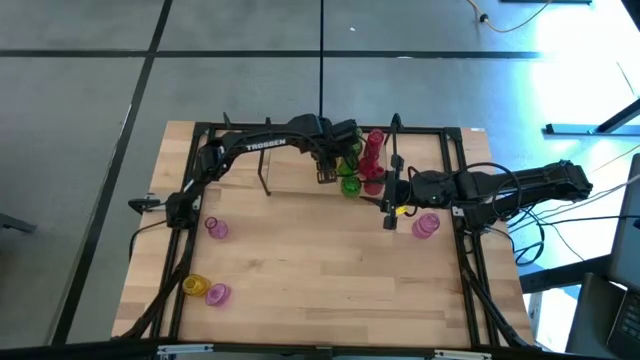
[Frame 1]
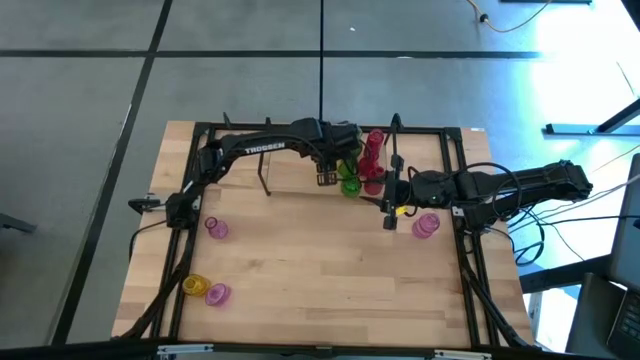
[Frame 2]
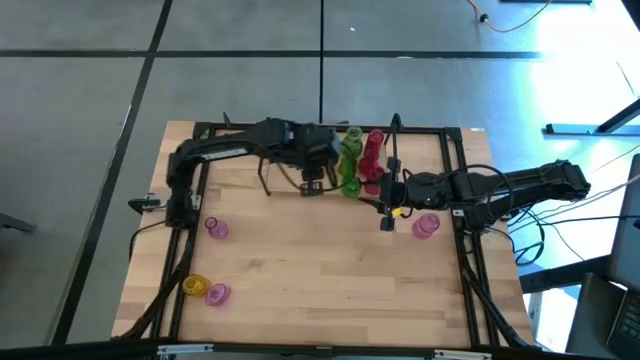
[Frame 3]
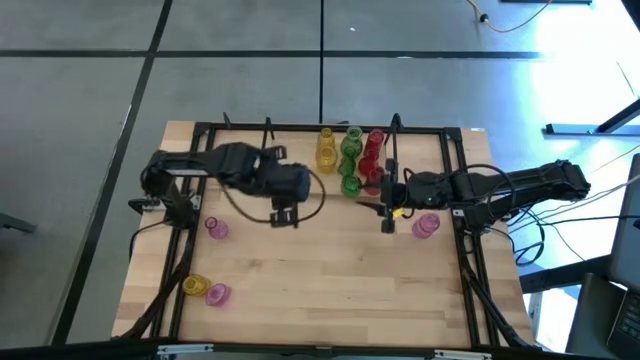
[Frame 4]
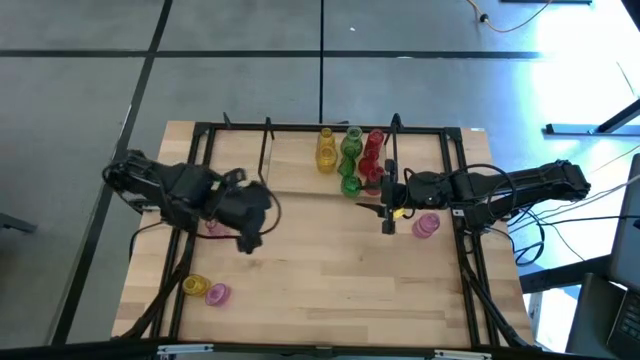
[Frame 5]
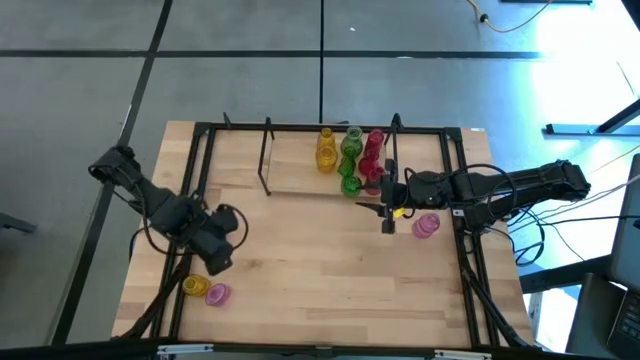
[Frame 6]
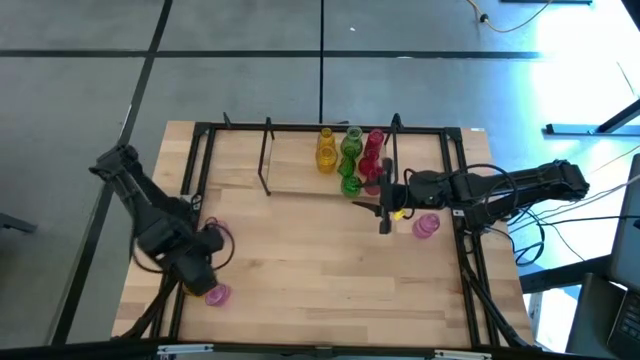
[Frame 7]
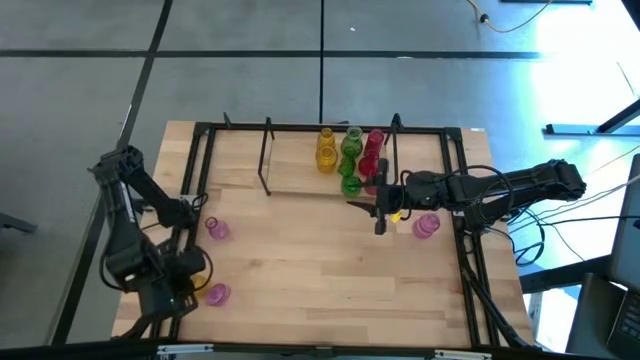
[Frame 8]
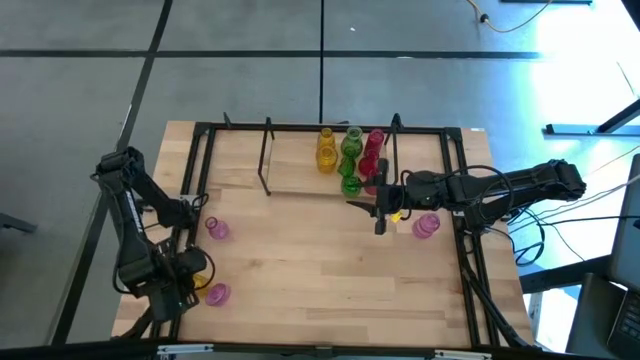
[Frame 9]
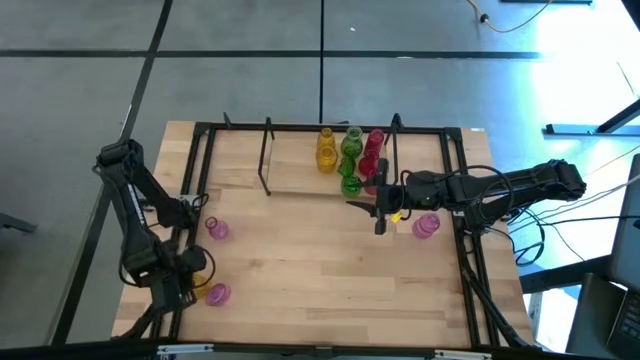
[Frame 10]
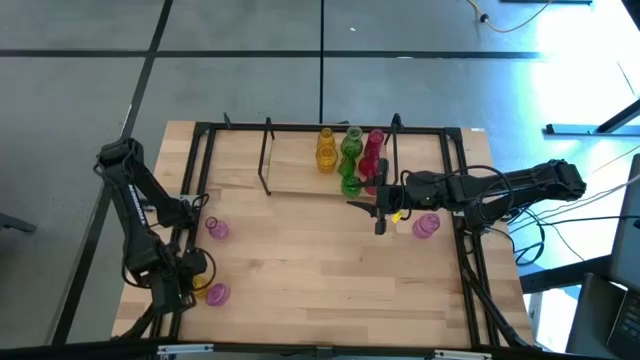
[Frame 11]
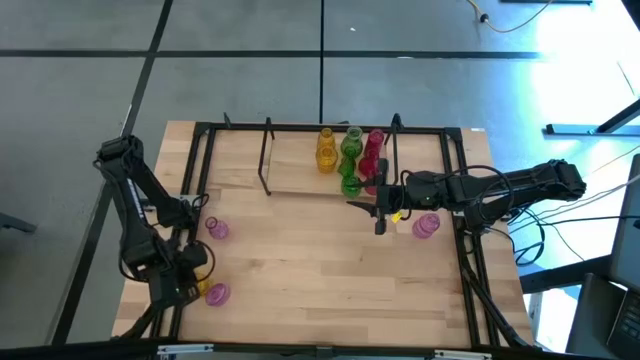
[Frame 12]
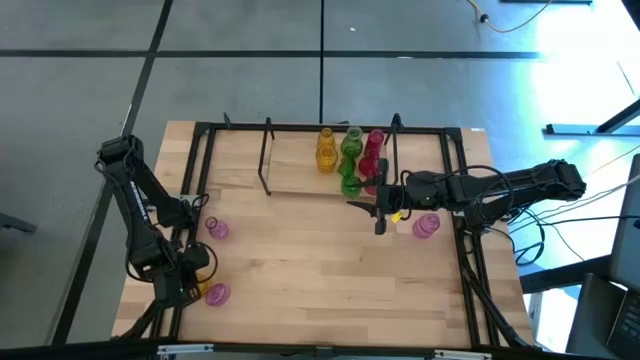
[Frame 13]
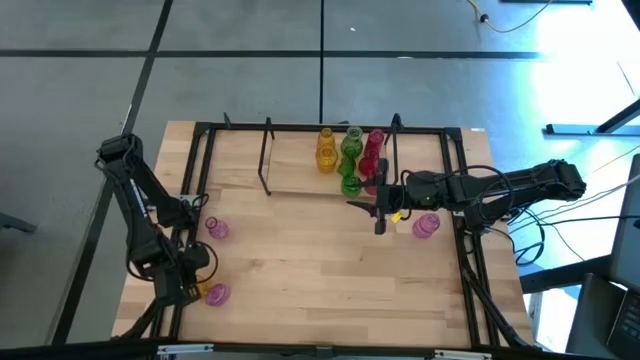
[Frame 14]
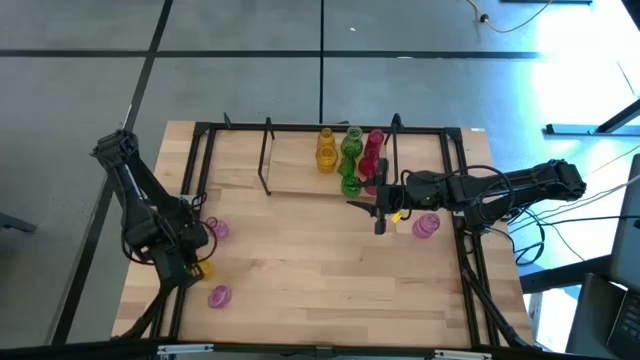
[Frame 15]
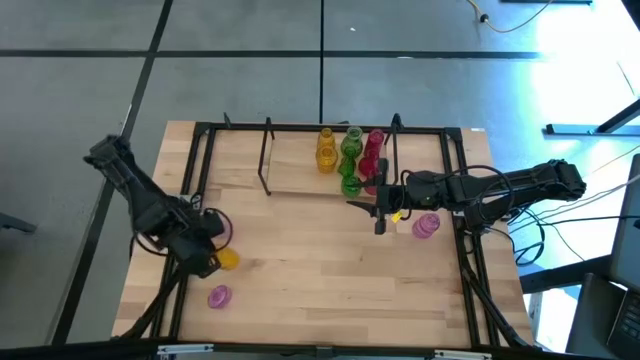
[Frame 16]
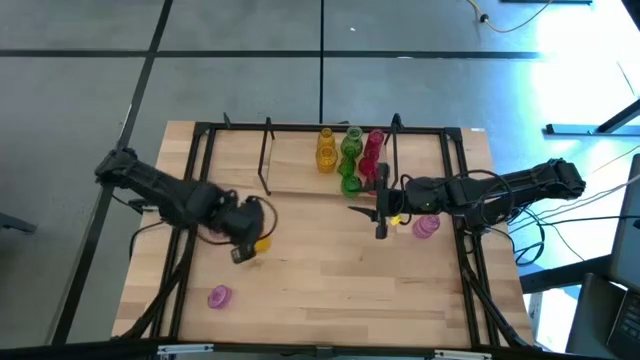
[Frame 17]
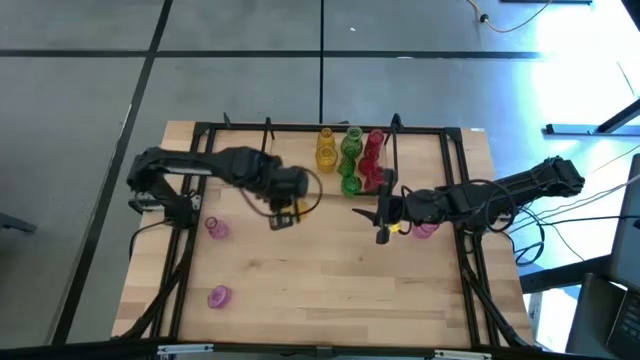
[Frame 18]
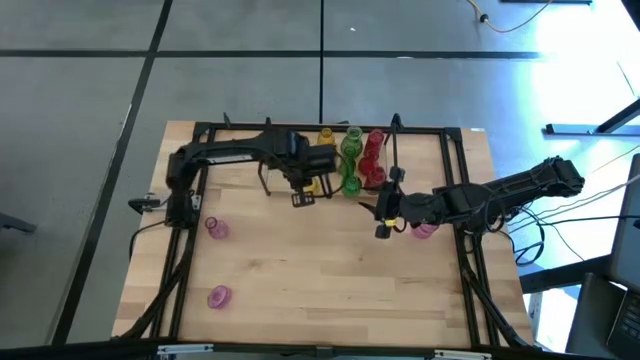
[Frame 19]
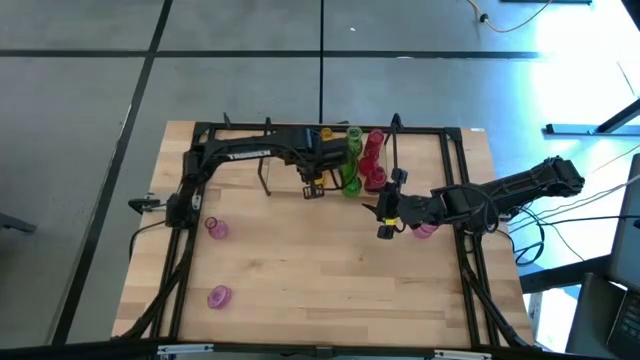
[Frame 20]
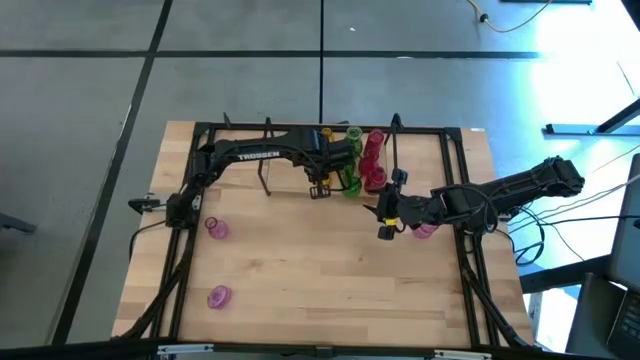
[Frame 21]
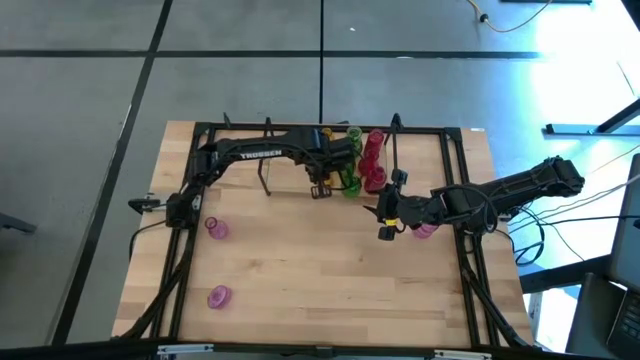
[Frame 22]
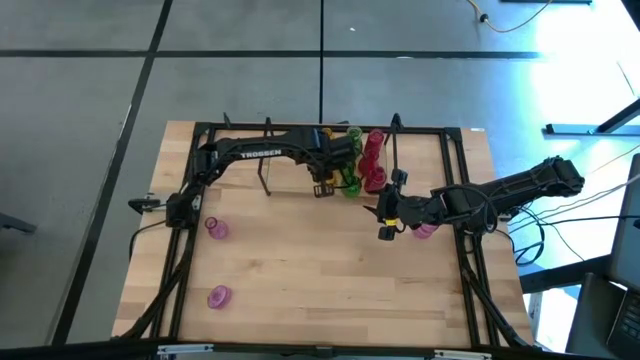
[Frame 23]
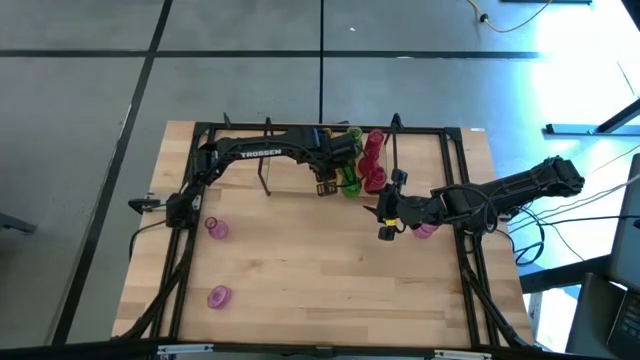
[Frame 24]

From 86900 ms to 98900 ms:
Task: sort vases onto shelf
Put the yellow vase on the shelf aligned with the other yellow vases

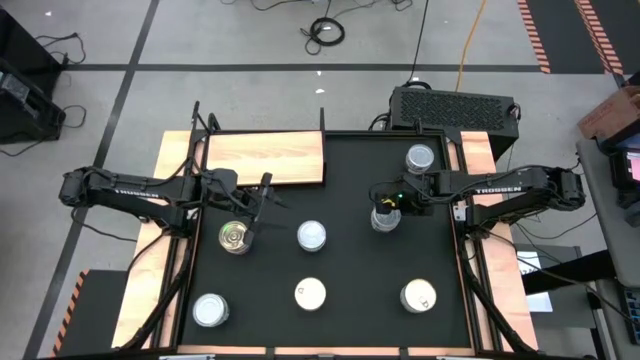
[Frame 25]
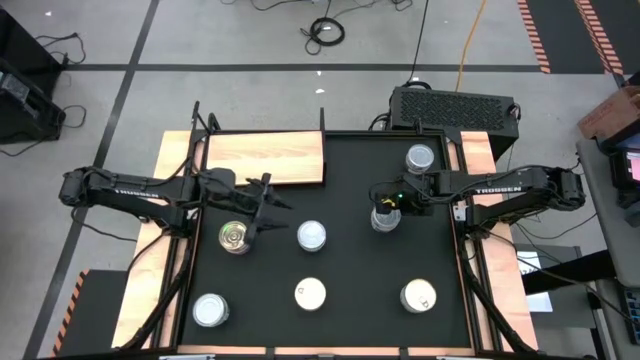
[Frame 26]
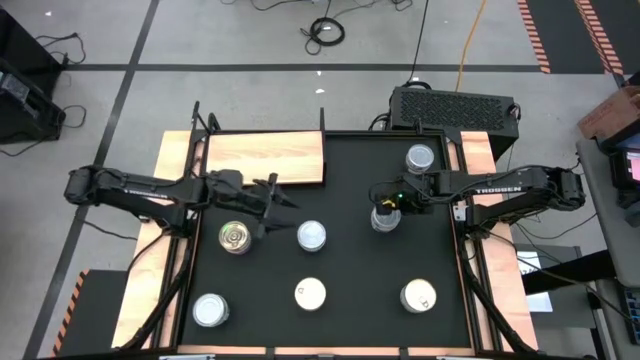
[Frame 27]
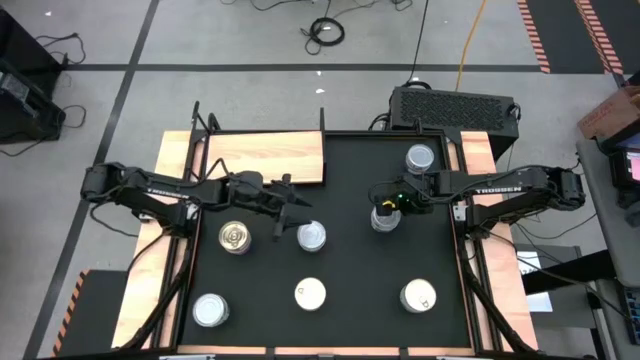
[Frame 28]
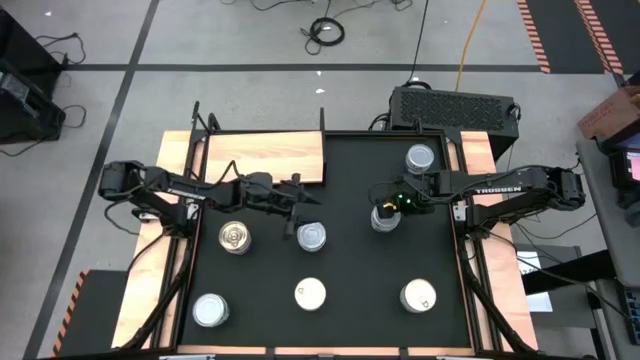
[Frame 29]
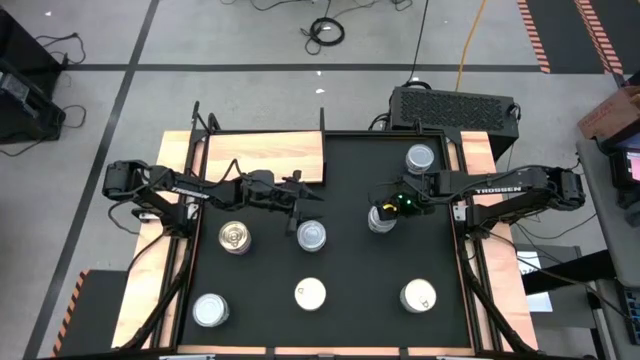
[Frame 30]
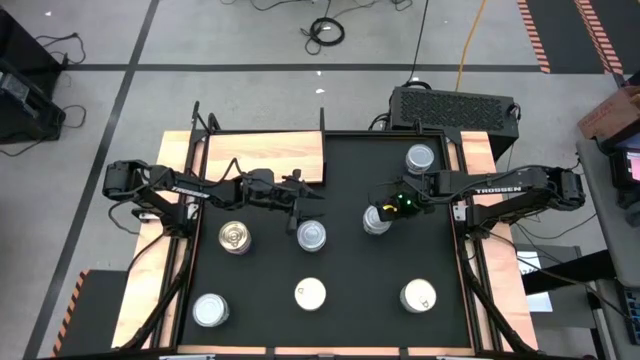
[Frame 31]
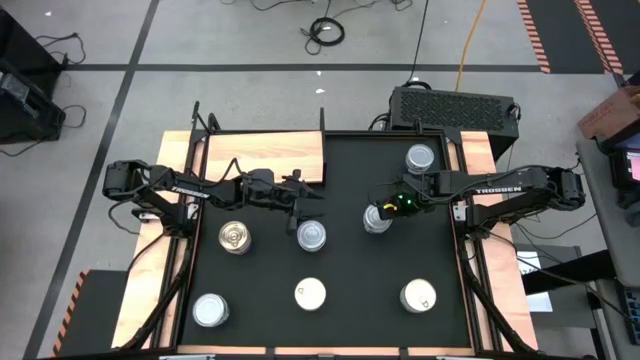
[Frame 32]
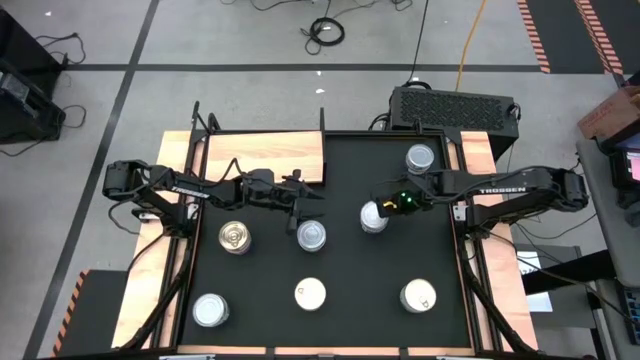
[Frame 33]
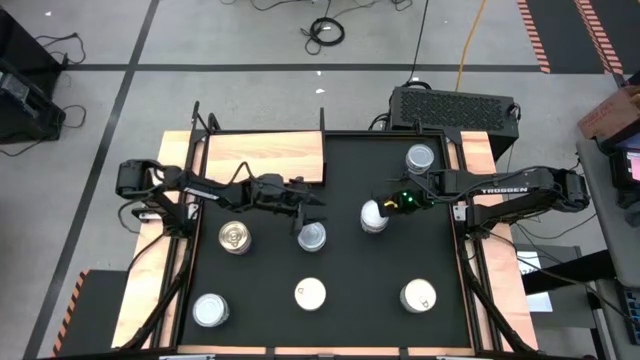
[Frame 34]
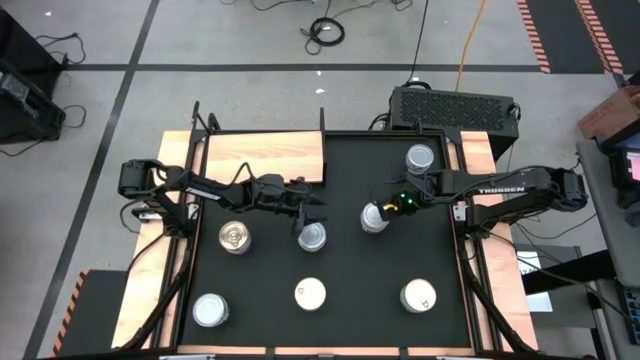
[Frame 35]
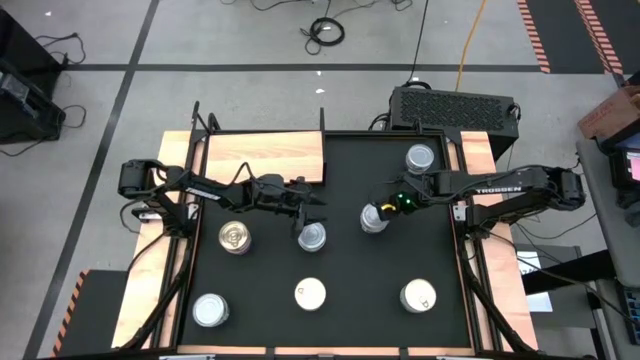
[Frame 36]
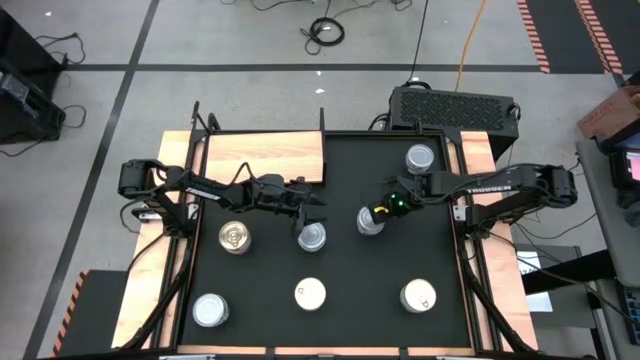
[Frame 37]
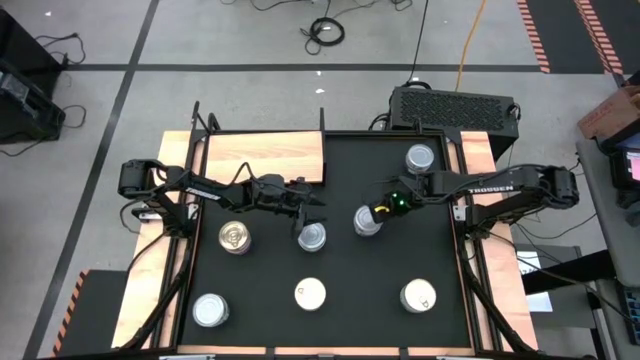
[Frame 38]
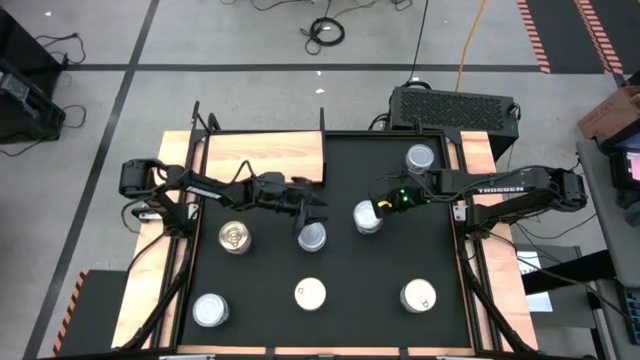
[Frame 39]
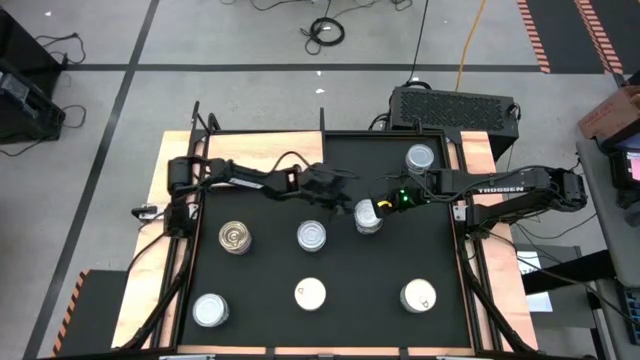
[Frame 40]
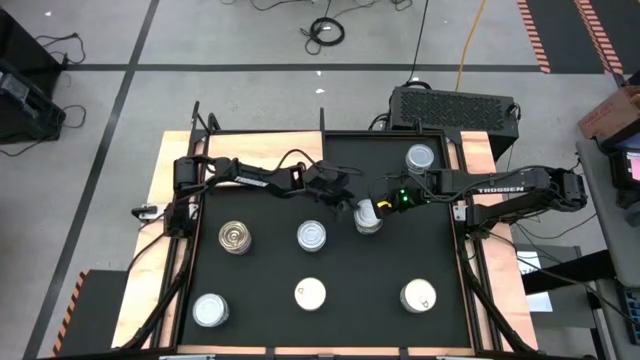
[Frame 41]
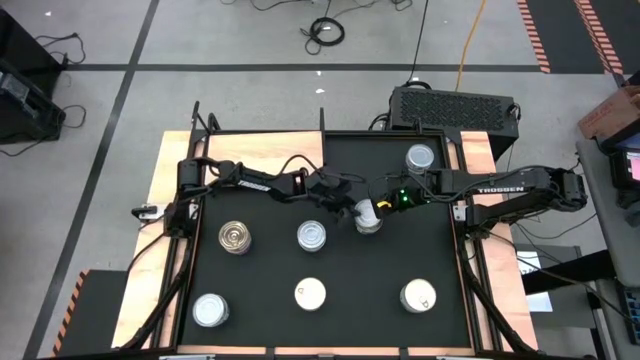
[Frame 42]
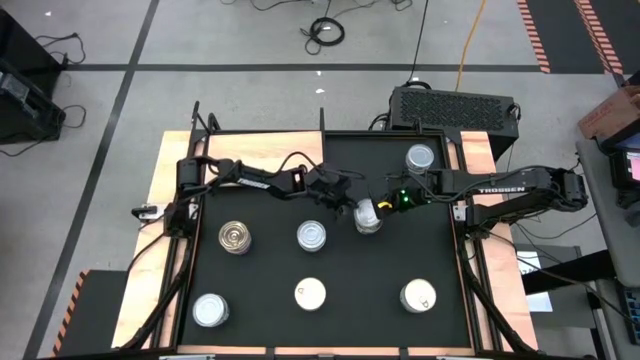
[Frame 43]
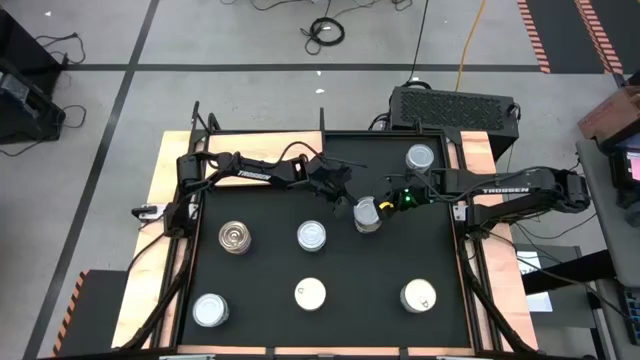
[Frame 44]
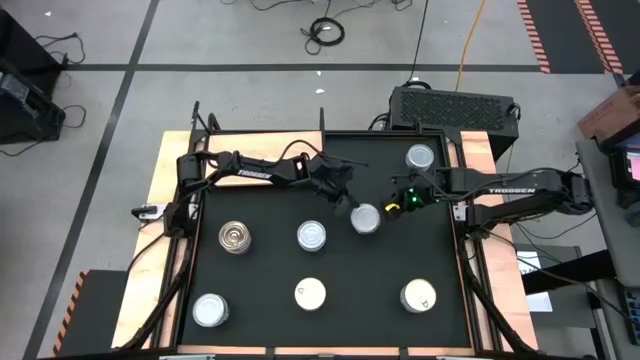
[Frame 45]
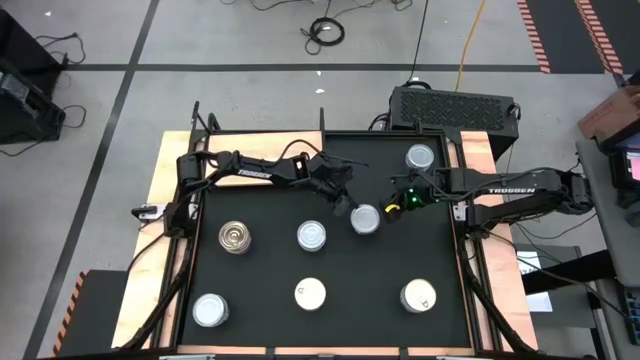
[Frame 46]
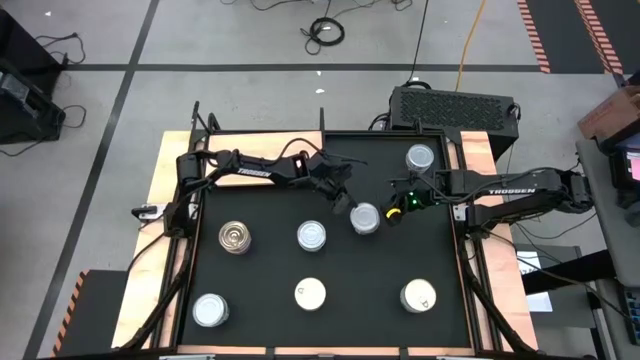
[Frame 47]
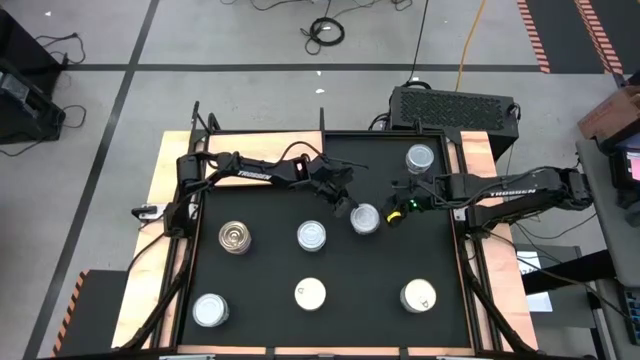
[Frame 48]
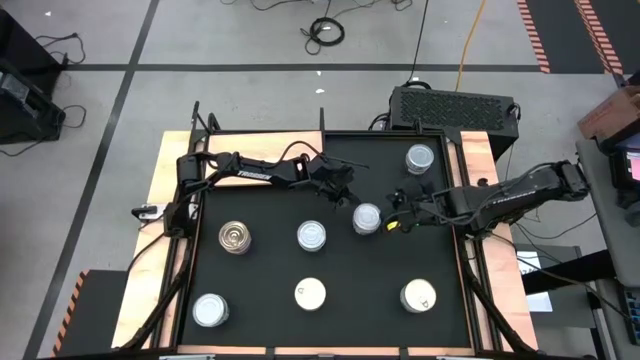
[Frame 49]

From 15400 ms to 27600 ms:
Task: Stack canned seafood by type on shelf
Remove the green and white tuna can from the blue and pink tuna can on the table
